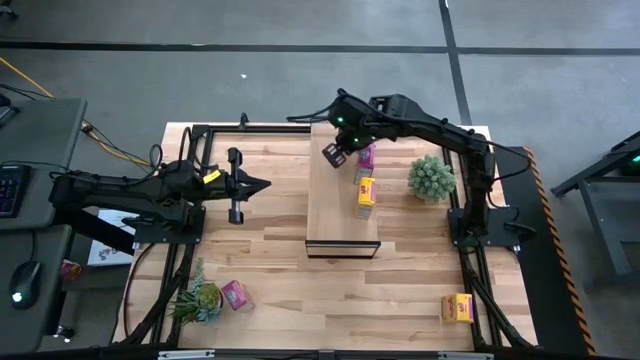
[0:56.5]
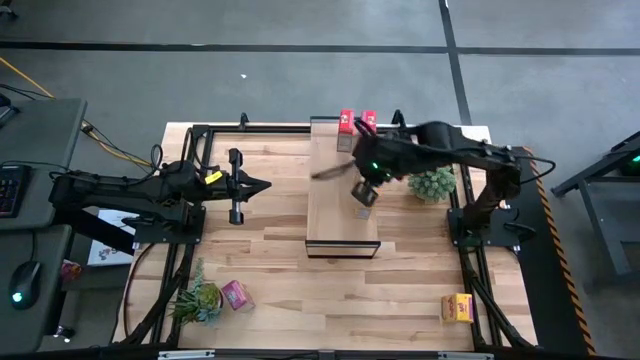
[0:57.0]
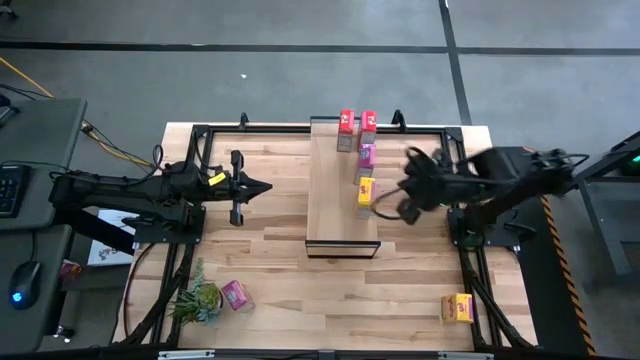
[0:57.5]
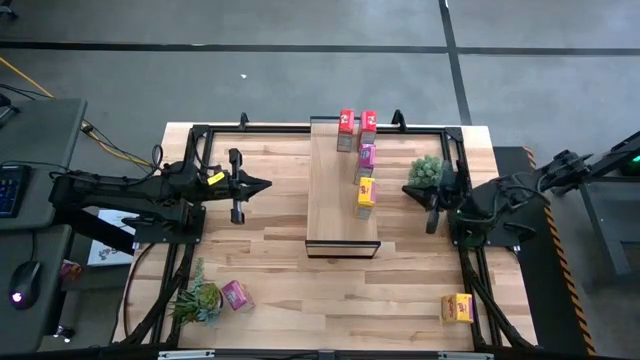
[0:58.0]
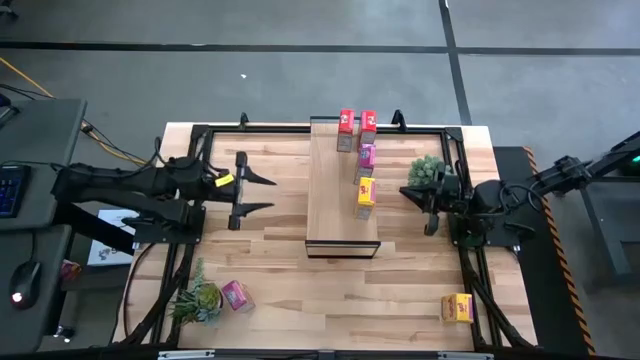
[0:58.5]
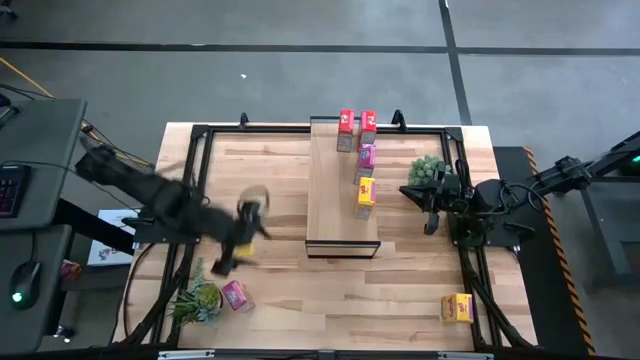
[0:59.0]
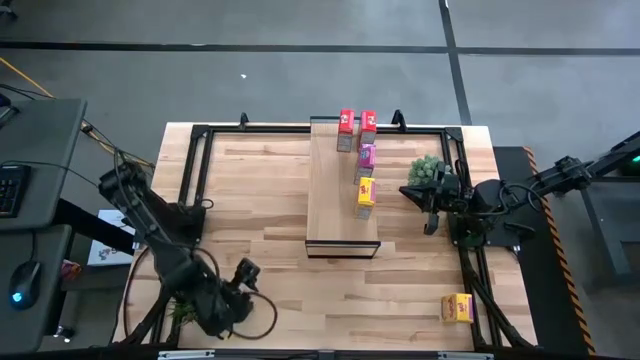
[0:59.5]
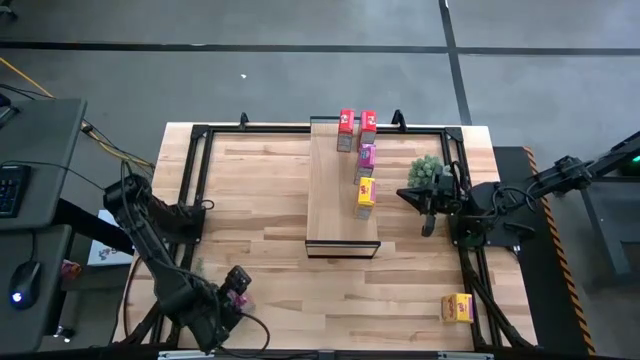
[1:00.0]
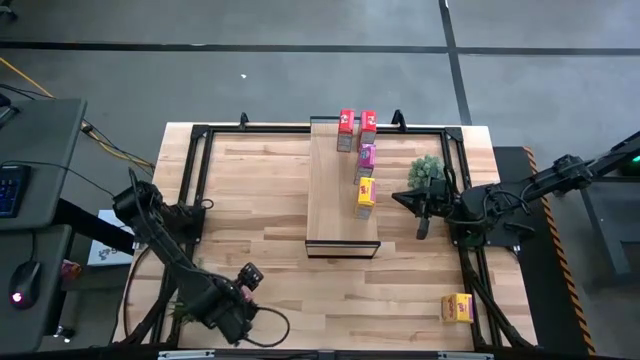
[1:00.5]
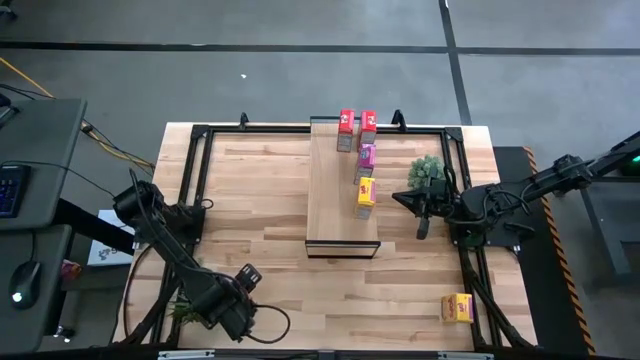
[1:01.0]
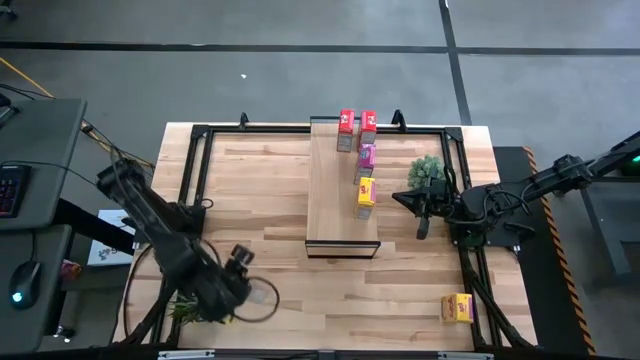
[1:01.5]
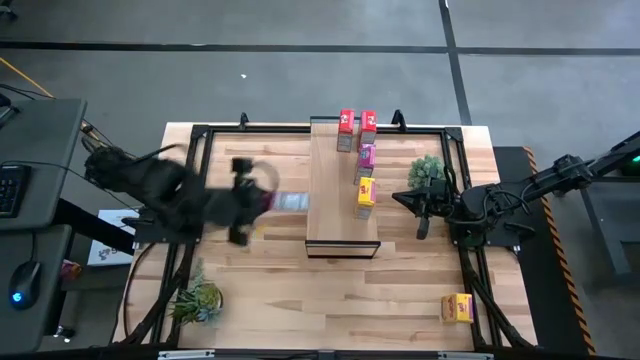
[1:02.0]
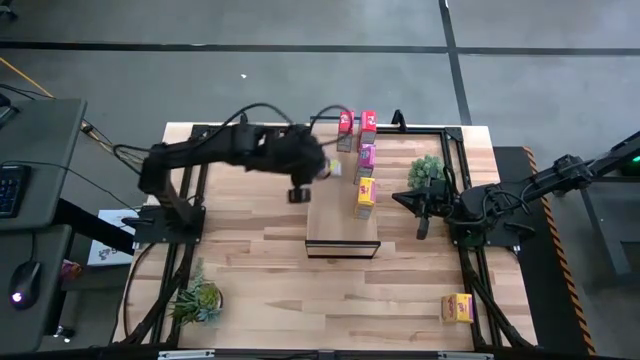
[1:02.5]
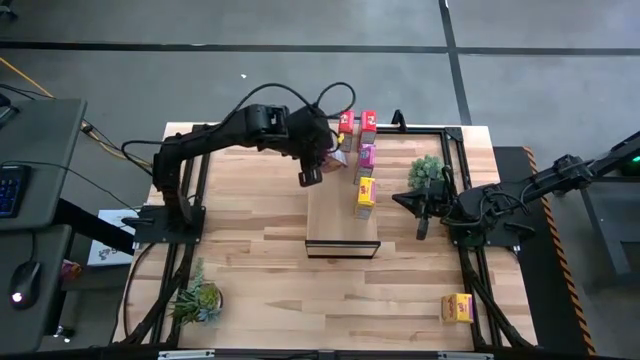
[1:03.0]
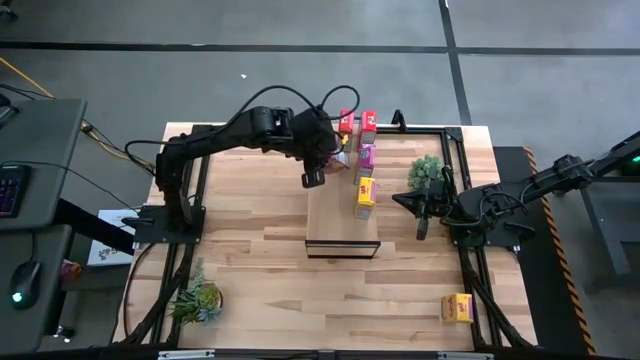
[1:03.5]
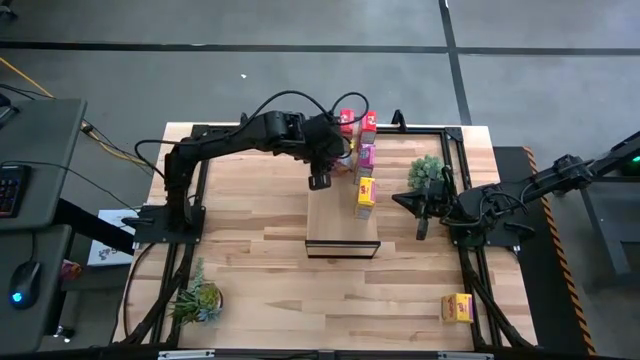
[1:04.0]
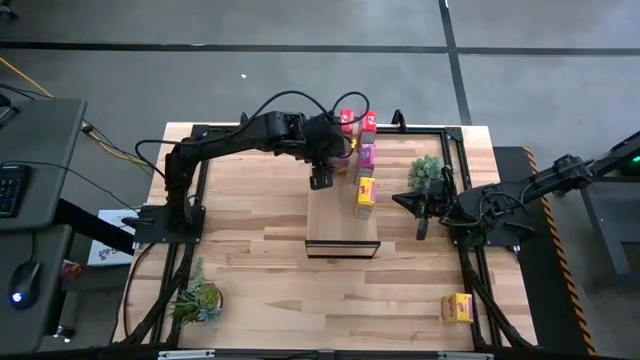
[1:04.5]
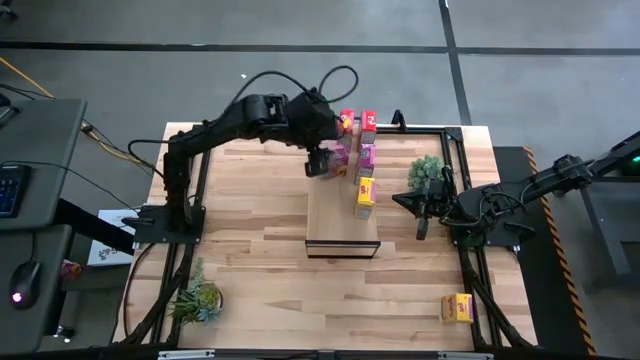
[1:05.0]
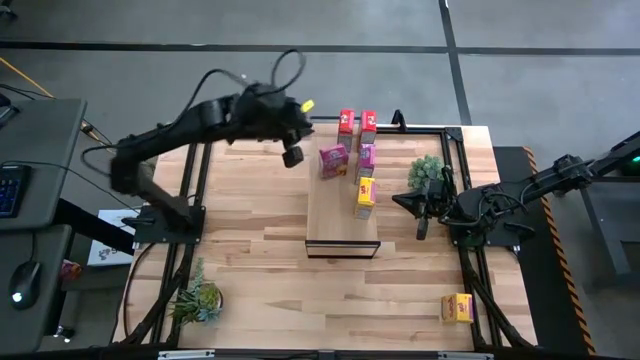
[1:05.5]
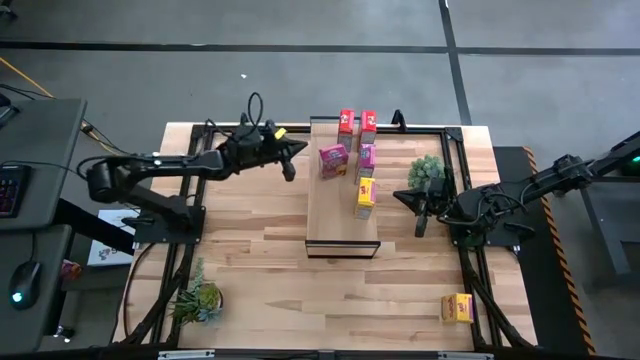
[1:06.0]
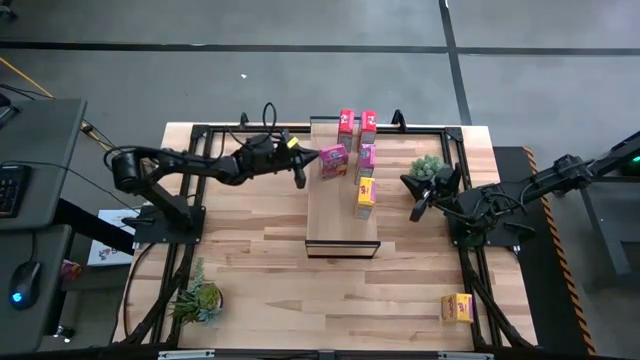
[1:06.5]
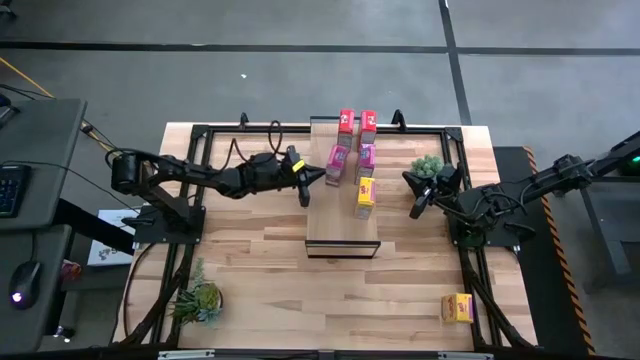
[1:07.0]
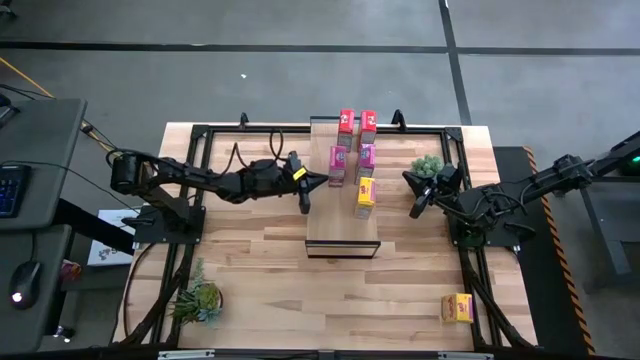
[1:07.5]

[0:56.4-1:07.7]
Task: Stack cereal on shelf
Put the purple cereal box on the shelf aligned with the purple cereal box

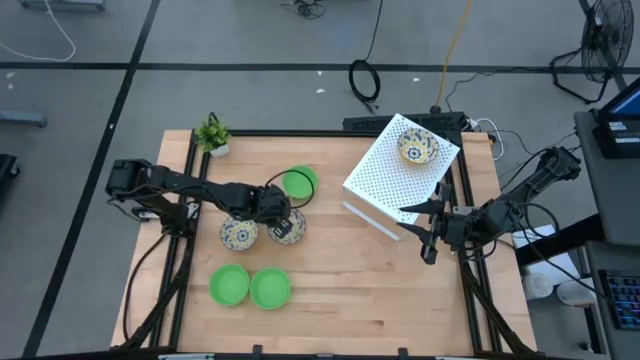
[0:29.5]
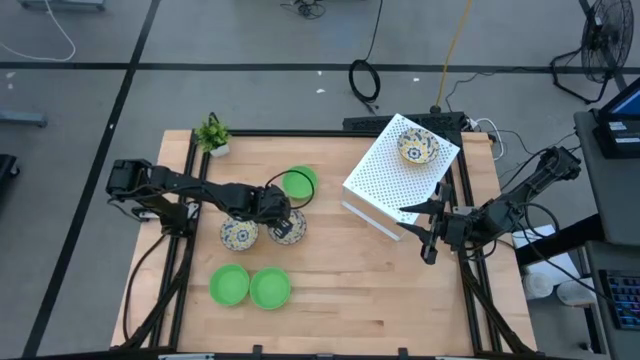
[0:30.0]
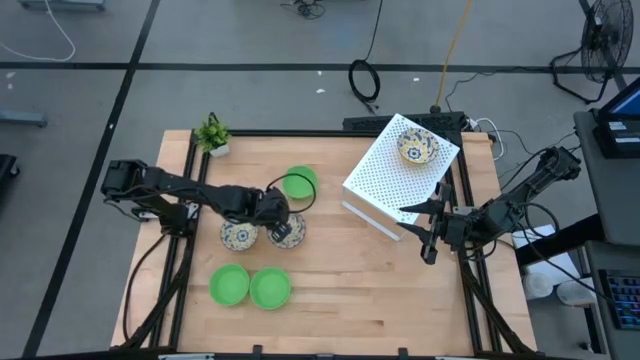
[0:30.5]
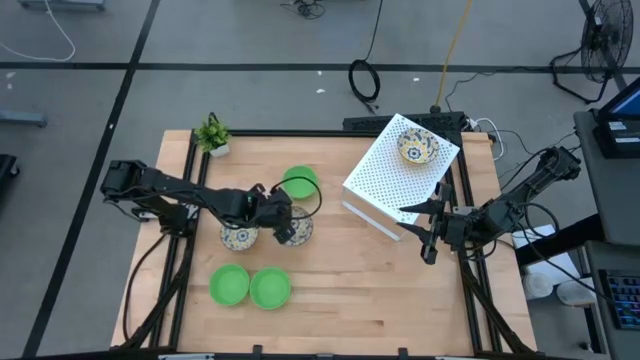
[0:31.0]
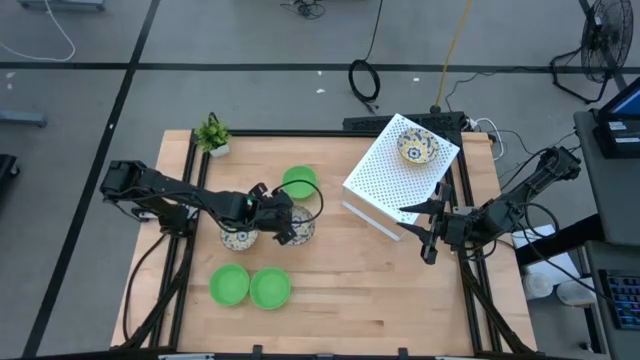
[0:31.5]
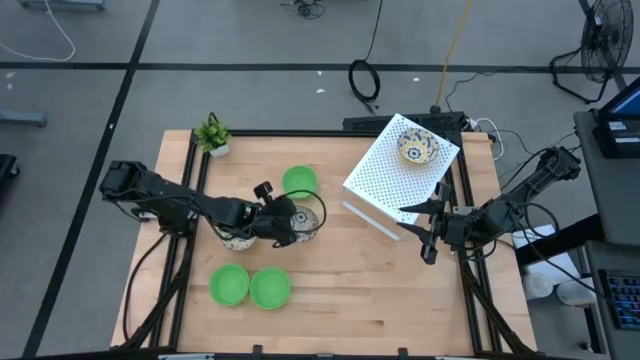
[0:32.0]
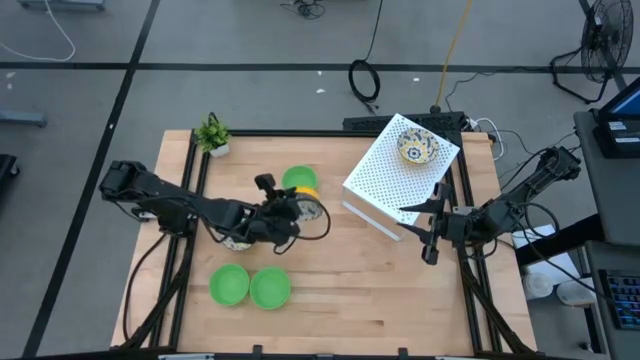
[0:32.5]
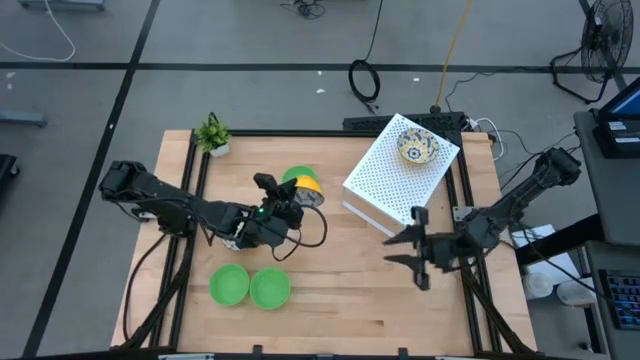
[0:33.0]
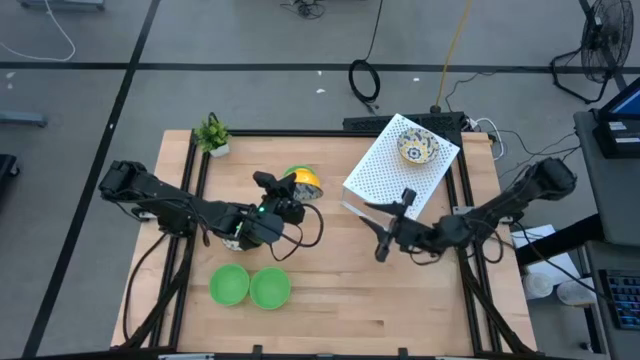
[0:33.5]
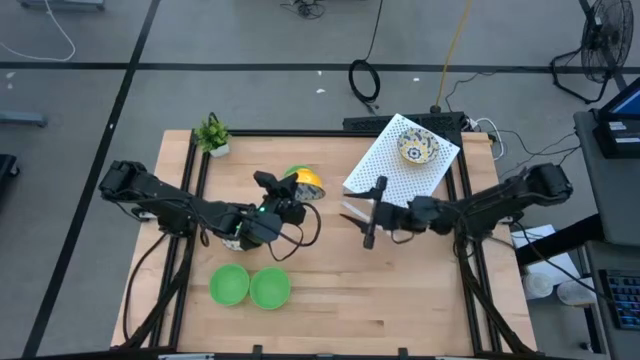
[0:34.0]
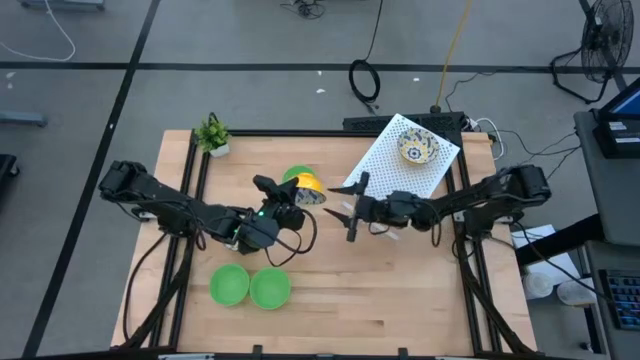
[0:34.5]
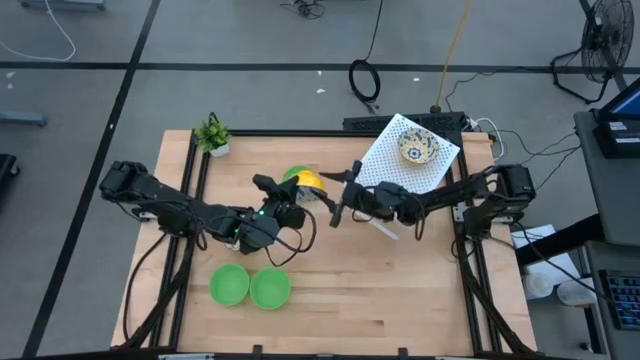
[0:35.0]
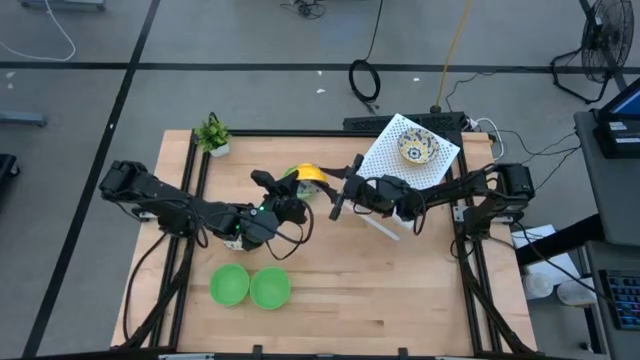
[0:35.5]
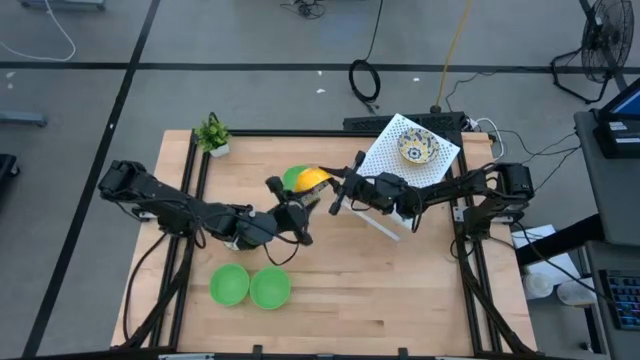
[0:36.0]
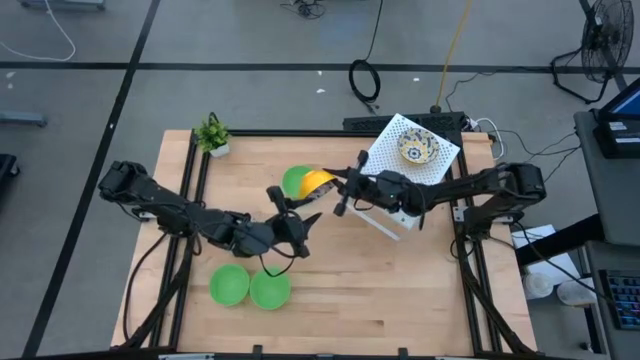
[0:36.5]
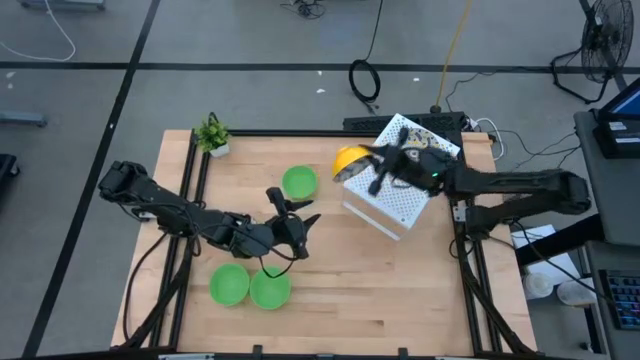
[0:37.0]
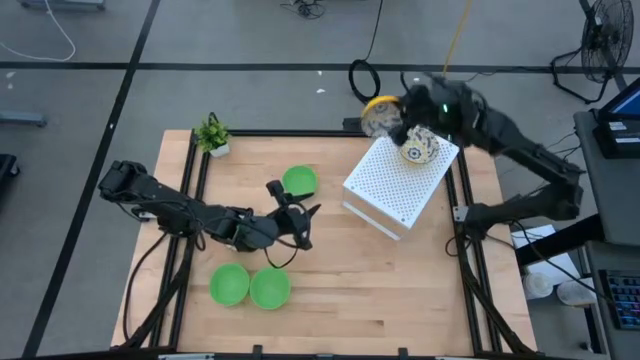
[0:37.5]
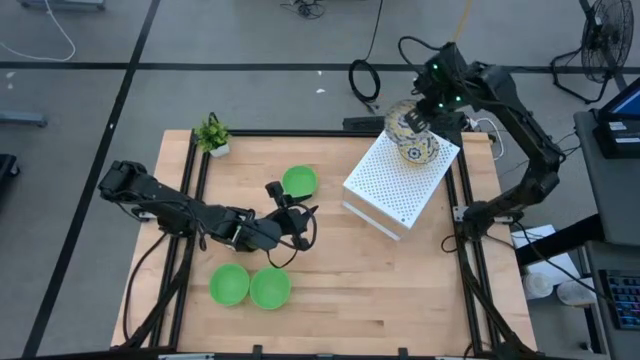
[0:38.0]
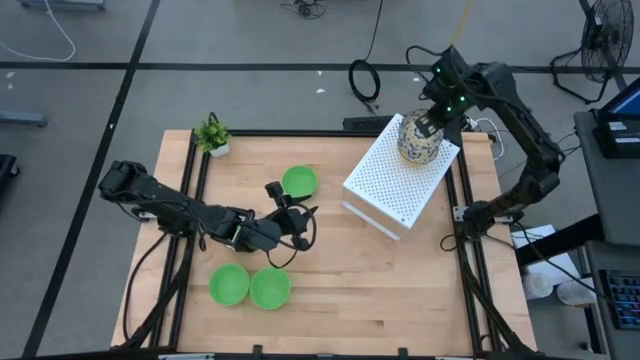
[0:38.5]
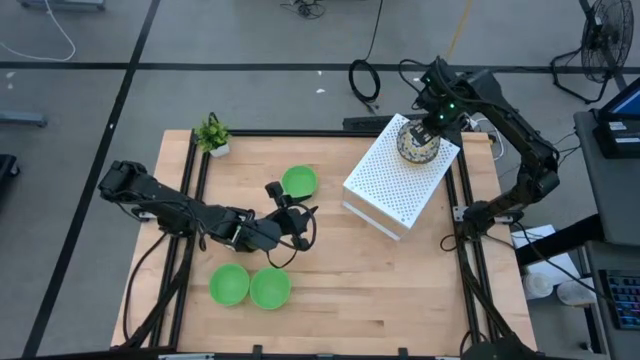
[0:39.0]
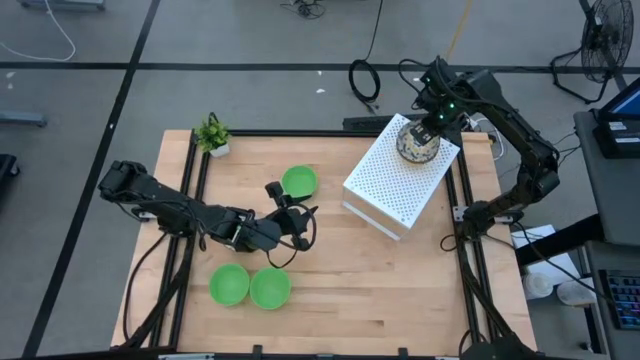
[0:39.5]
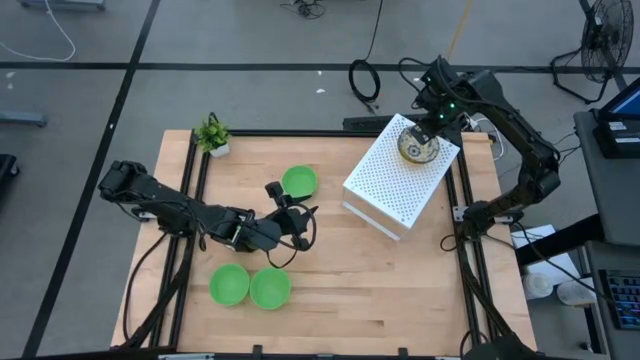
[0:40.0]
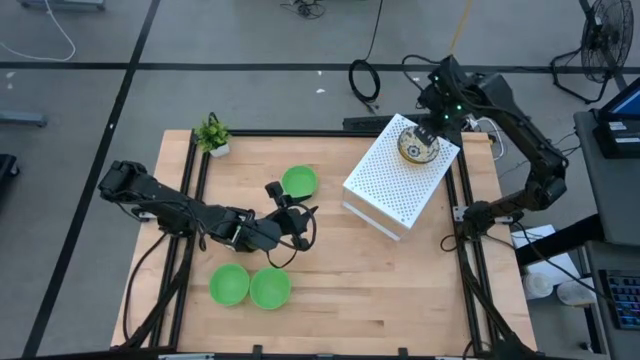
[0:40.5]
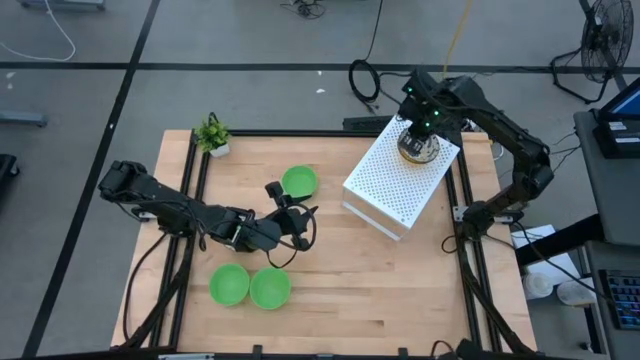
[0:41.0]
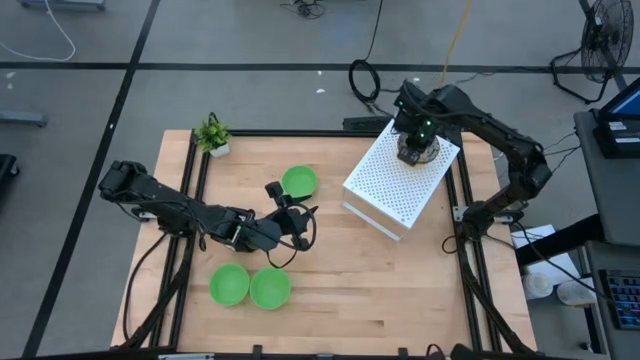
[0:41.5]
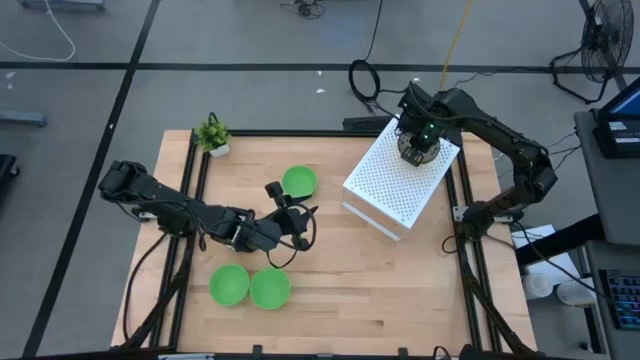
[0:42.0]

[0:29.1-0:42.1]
Task: Pick & Place Mini bowls
Stack the right yellow patterned bowl on top of the other yellow patterned bowl on the shelf
